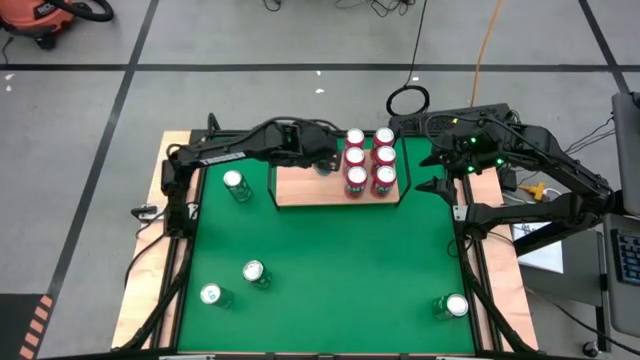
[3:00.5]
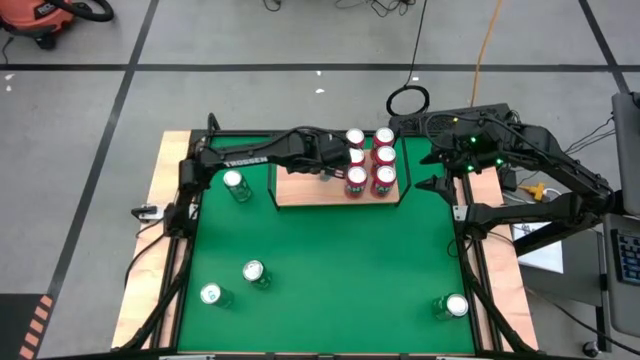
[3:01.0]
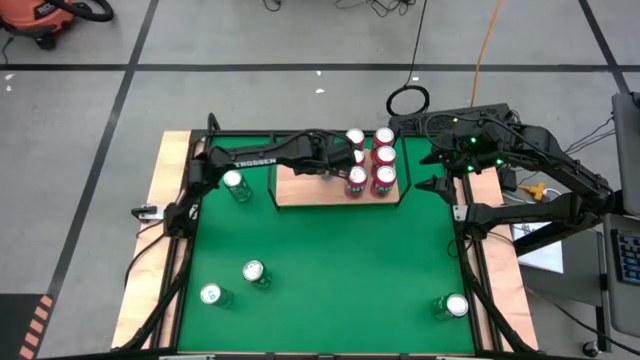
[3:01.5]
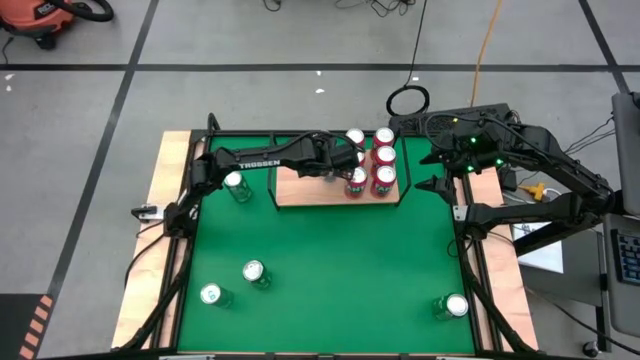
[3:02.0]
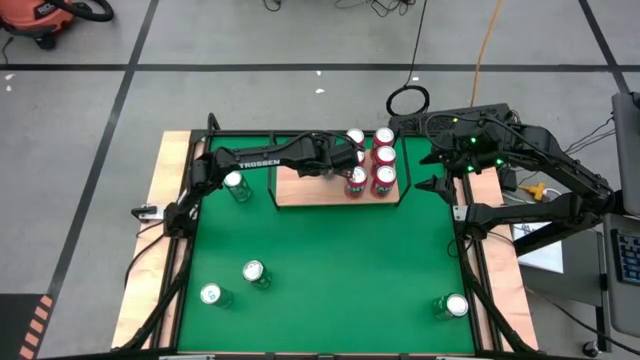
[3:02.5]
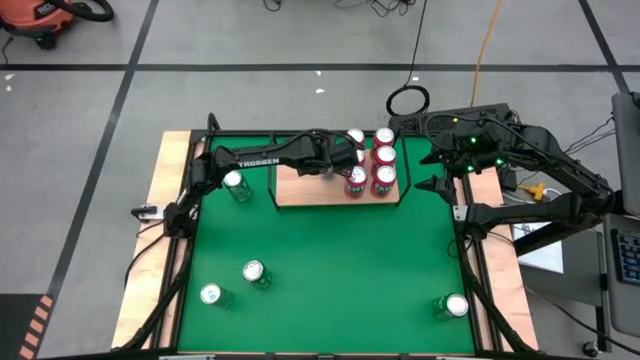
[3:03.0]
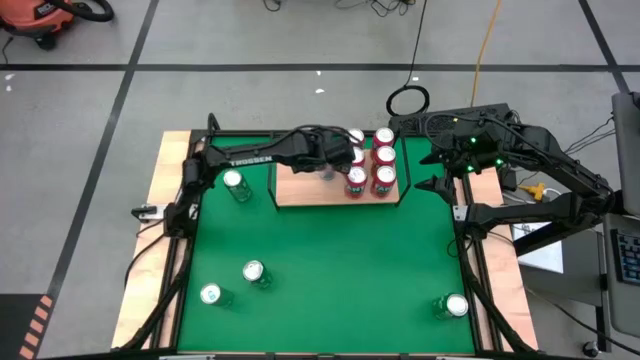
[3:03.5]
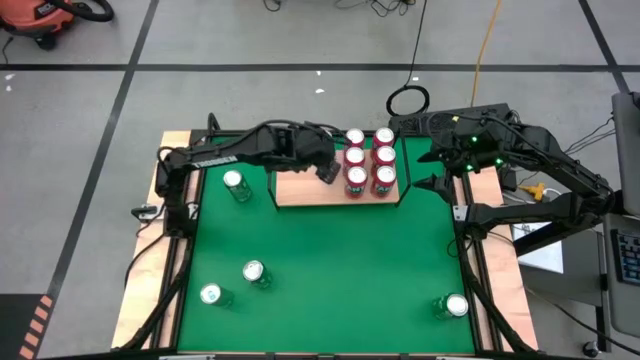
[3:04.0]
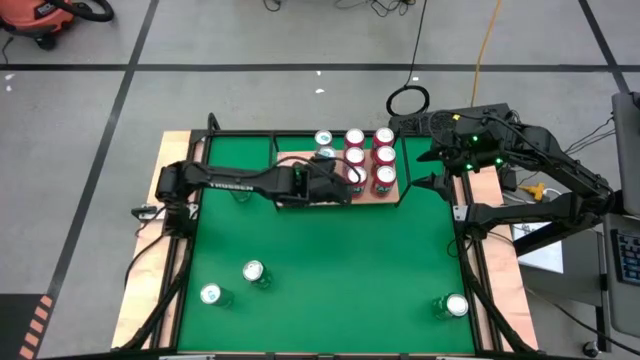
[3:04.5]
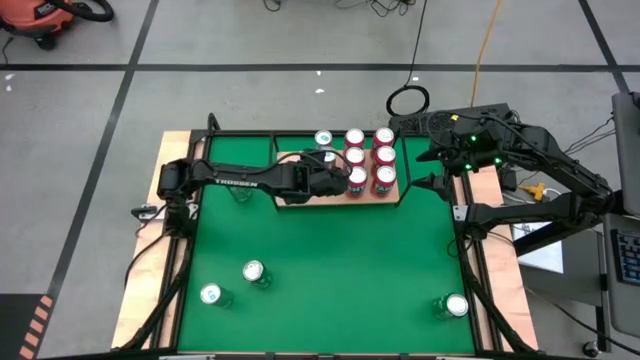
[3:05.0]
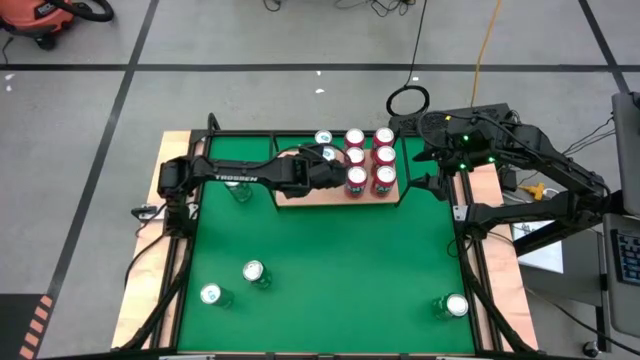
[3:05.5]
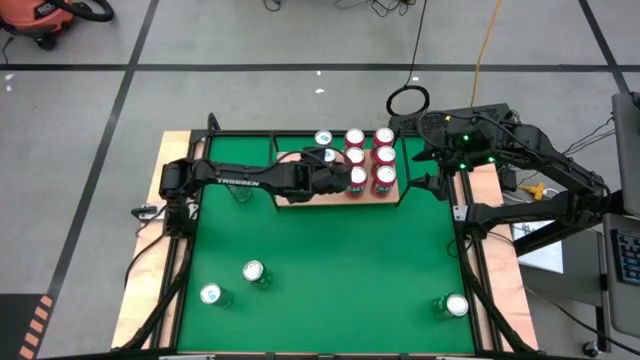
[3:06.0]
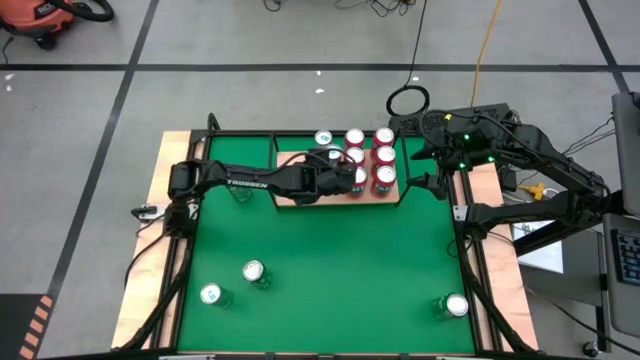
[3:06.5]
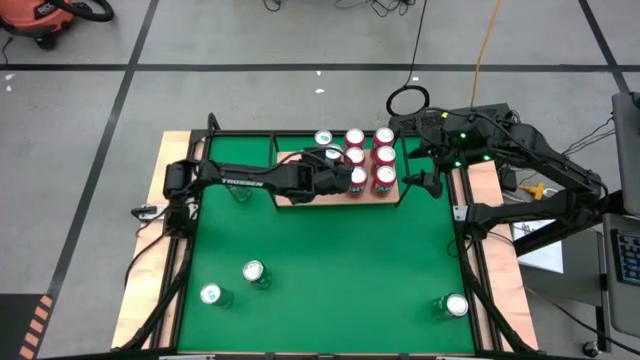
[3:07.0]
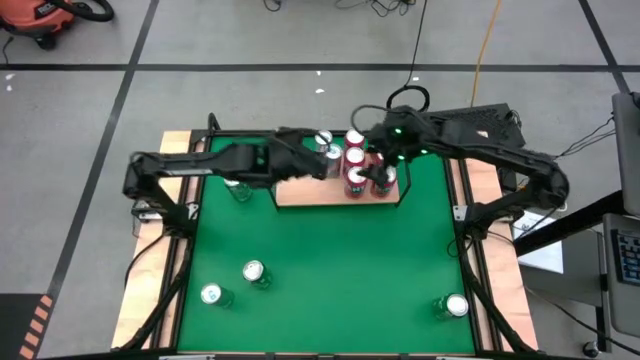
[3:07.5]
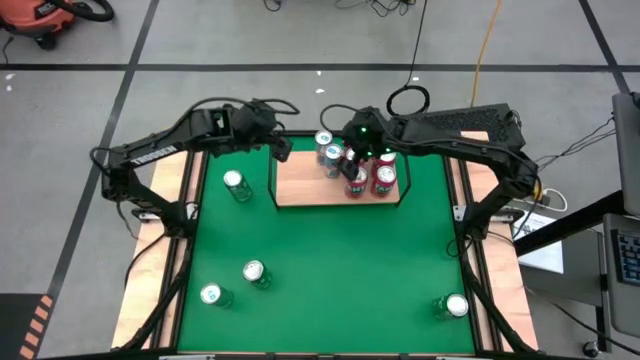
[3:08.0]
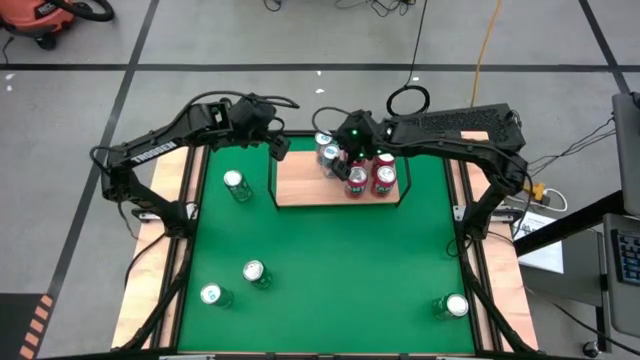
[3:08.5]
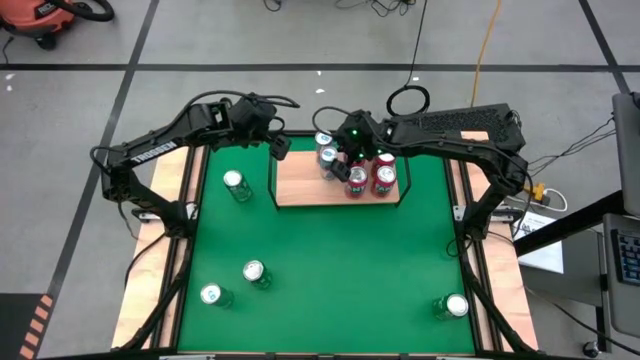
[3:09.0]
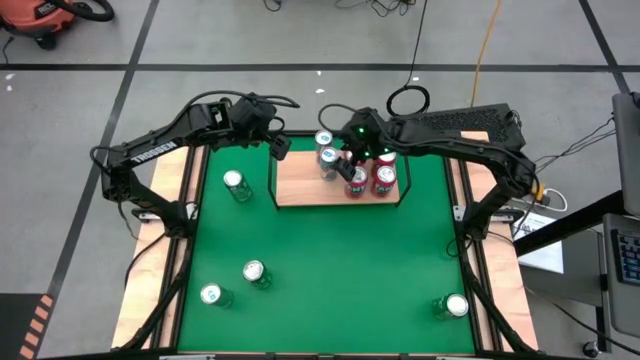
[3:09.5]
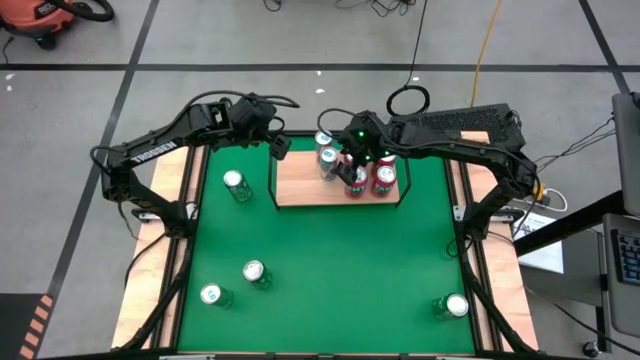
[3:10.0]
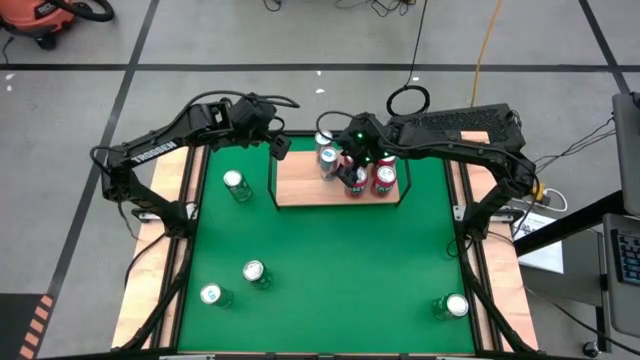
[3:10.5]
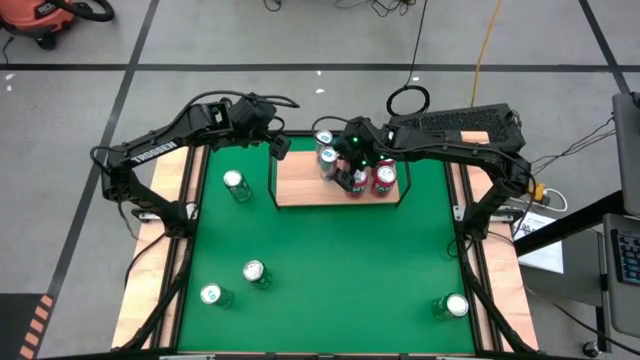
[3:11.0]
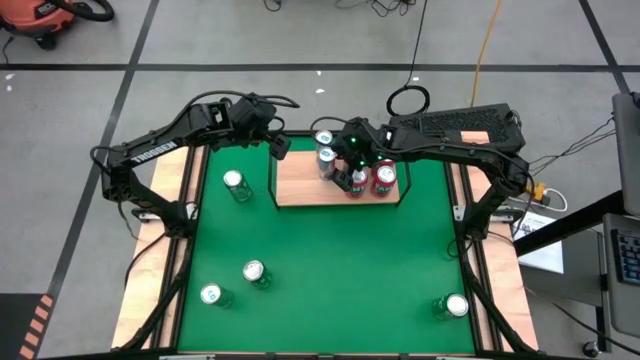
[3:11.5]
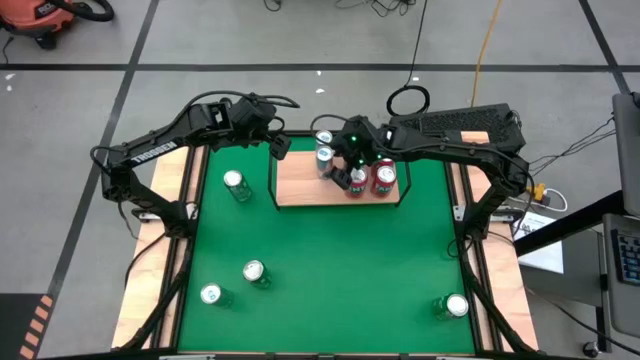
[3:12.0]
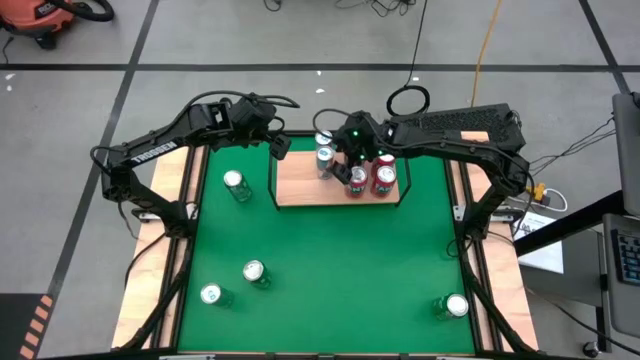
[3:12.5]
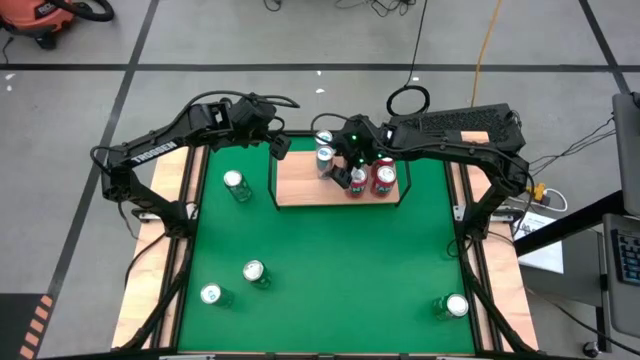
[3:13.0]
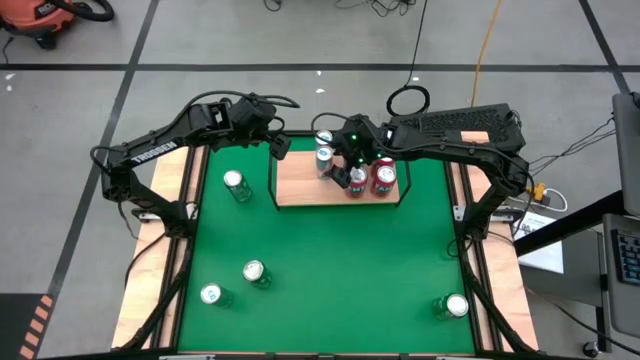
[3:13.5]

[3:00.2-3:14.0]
Task: Place canned beverage on shelf
Put the blue soda can on the shelf aligned with the other blue soda can on the shelf

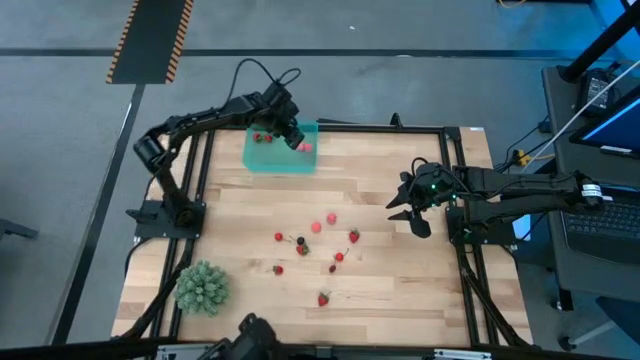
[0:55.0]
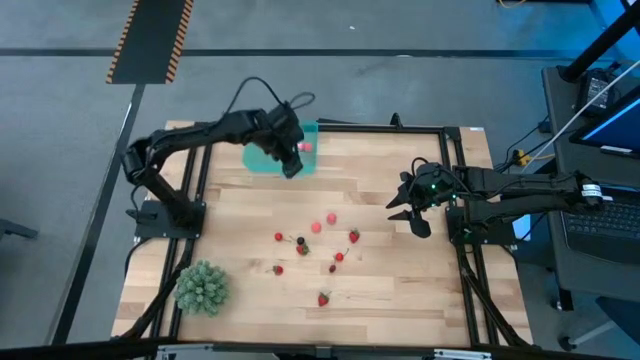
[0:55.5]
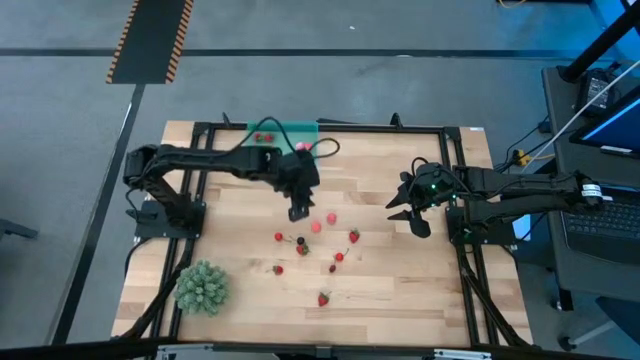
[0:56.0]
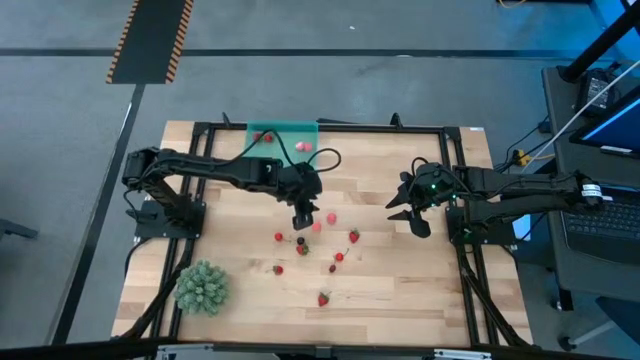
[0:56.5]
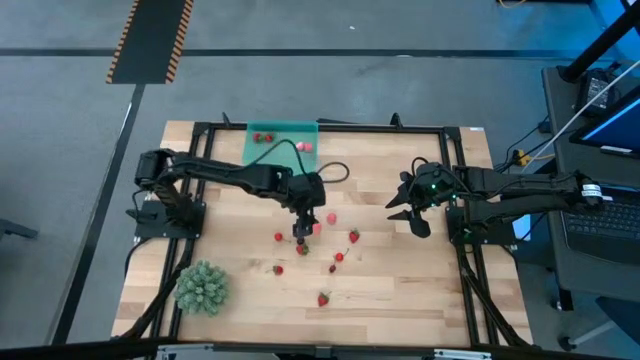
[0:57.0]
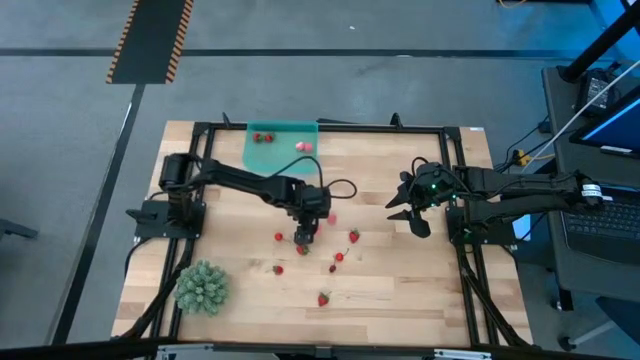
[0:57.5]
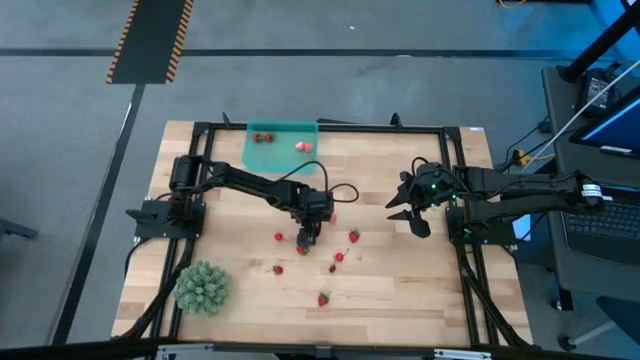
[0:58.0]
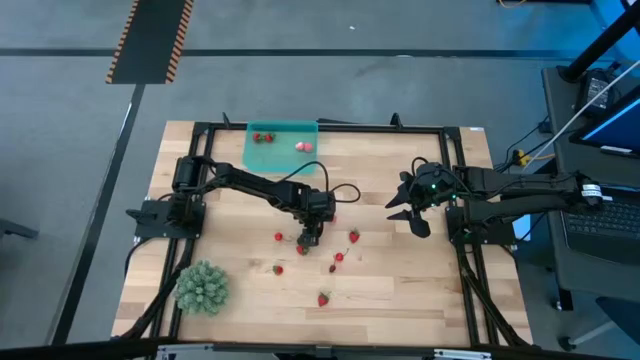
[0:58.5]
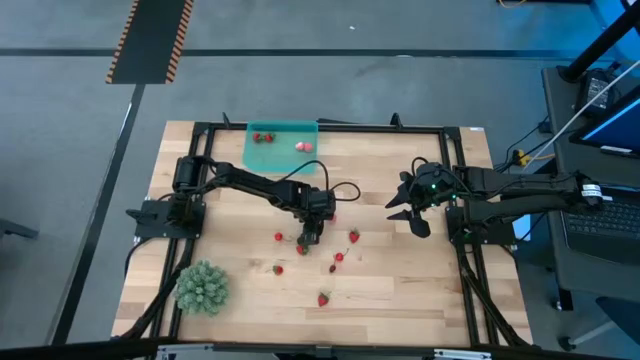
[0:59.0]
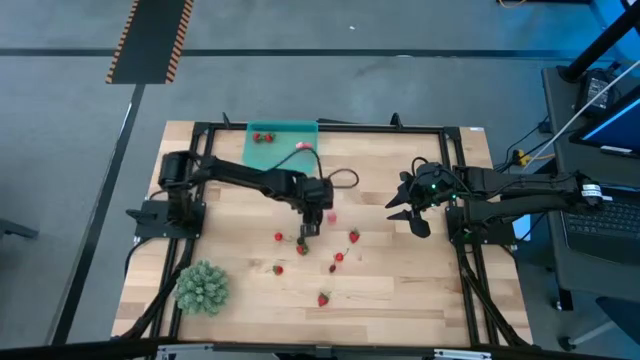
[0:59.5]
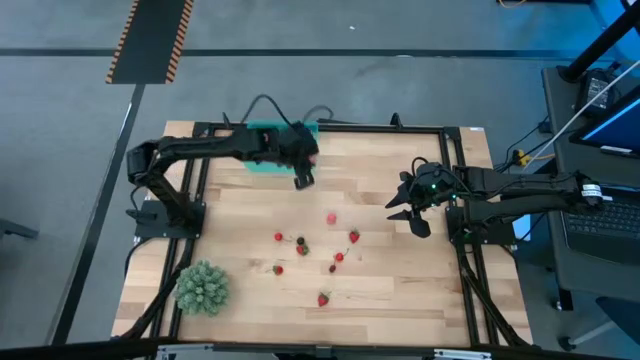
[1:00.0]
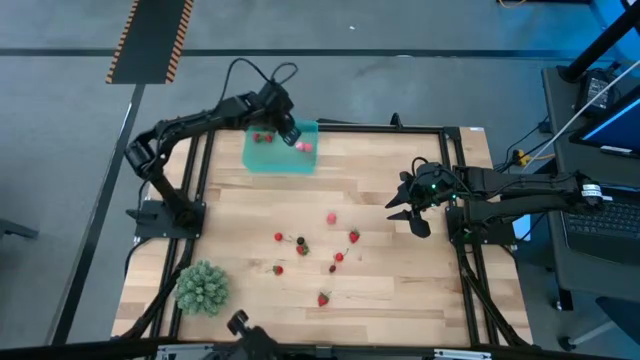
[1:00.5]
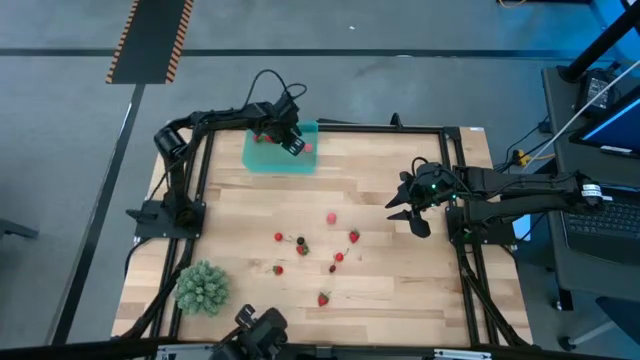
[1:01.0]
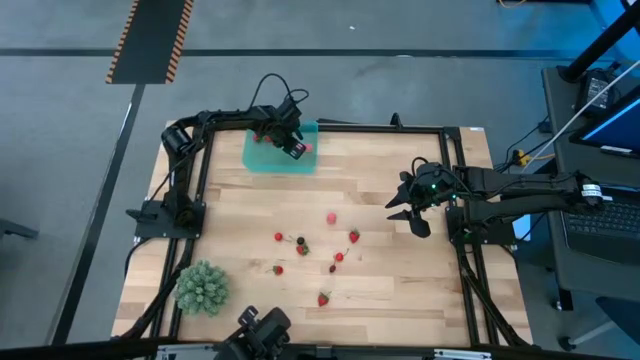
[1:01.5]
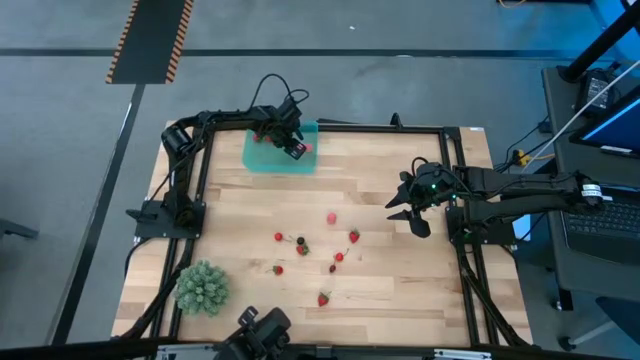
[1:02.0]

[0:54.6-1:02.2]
Task: Pick and placing Produce into tupperware
Put the pink peach into the blue bin
